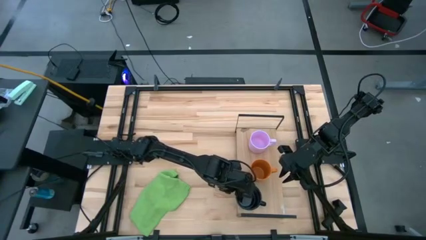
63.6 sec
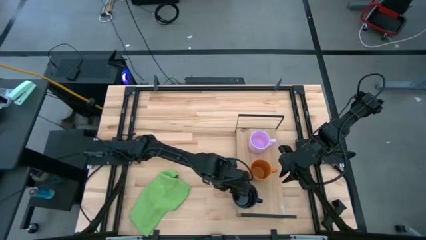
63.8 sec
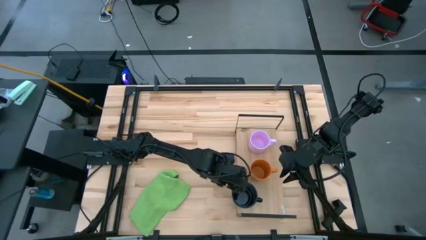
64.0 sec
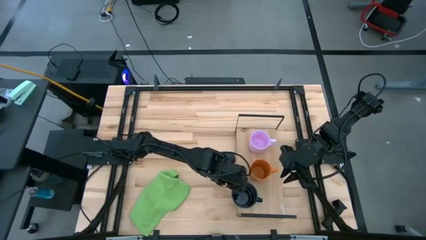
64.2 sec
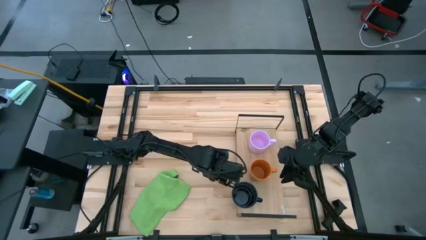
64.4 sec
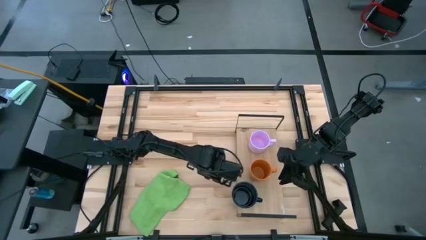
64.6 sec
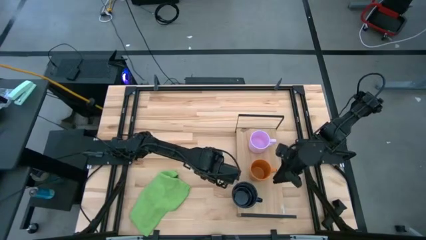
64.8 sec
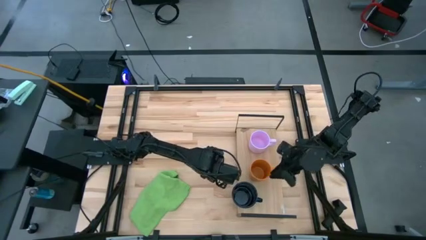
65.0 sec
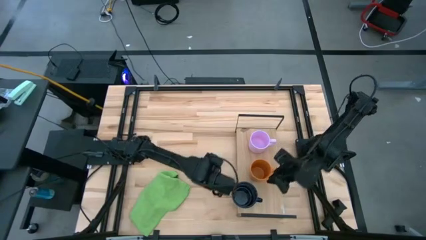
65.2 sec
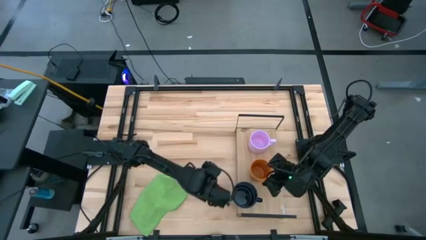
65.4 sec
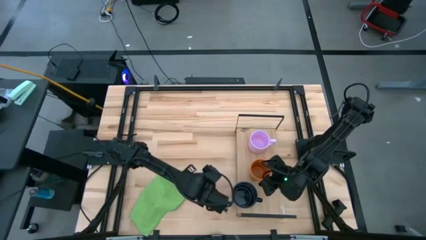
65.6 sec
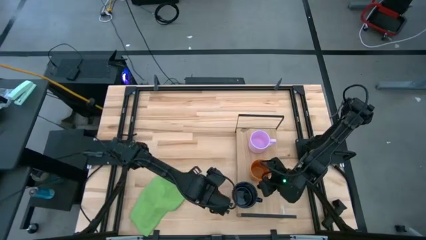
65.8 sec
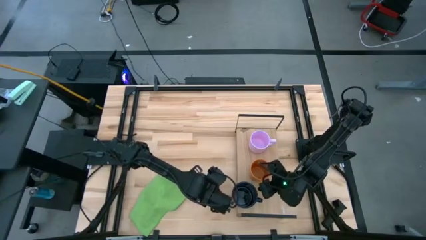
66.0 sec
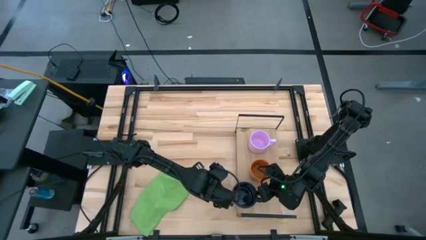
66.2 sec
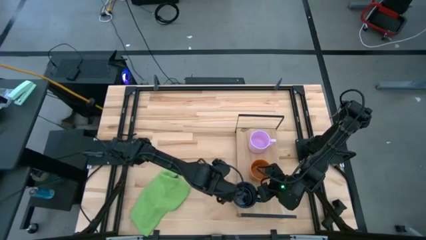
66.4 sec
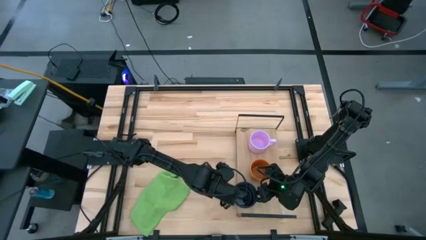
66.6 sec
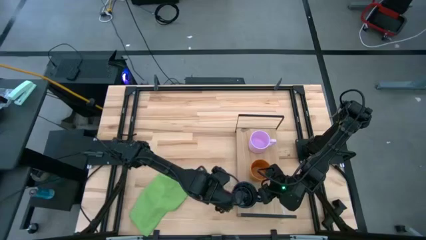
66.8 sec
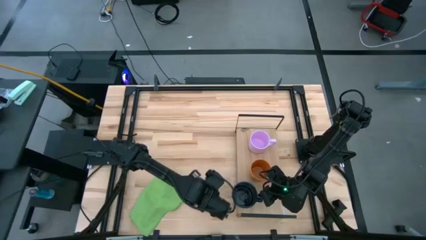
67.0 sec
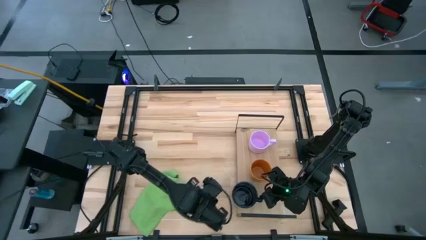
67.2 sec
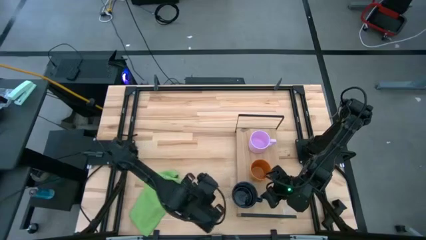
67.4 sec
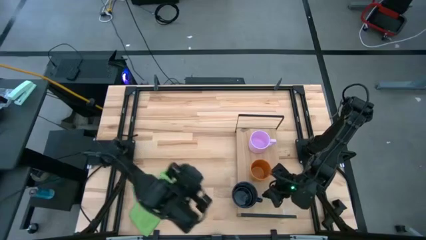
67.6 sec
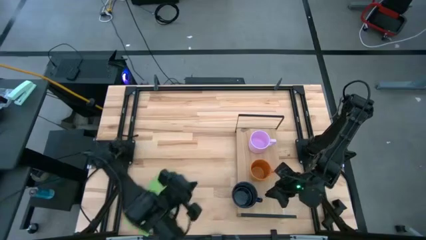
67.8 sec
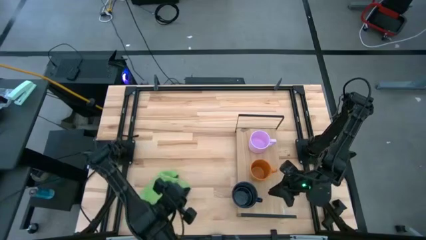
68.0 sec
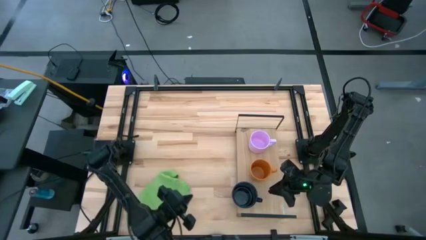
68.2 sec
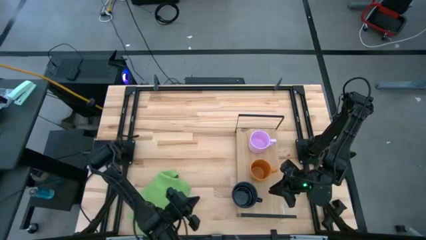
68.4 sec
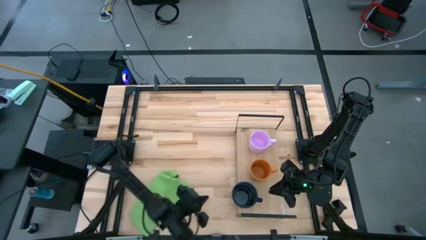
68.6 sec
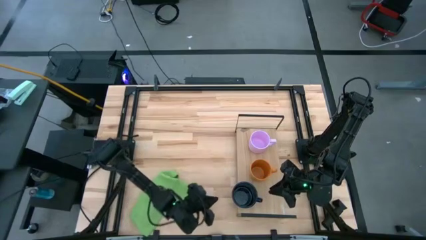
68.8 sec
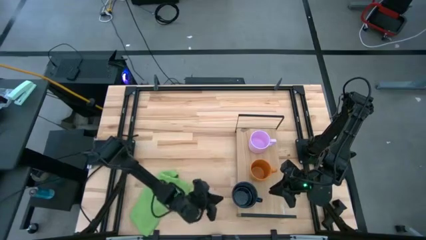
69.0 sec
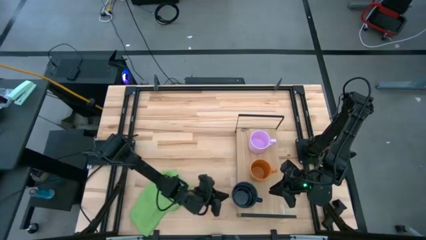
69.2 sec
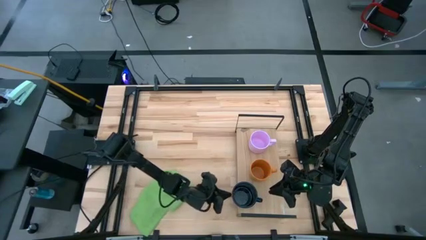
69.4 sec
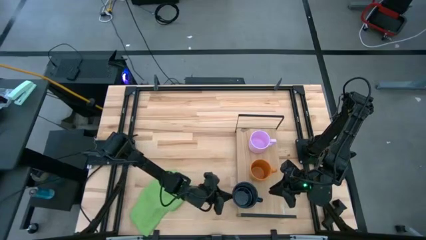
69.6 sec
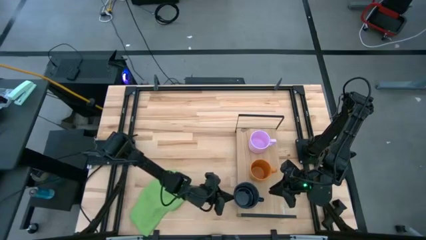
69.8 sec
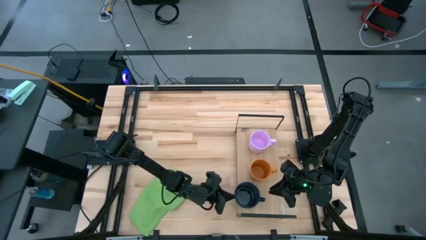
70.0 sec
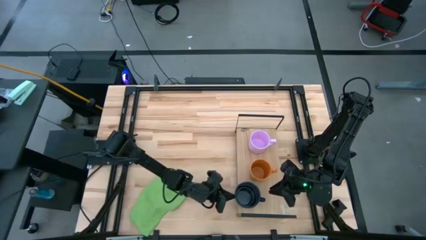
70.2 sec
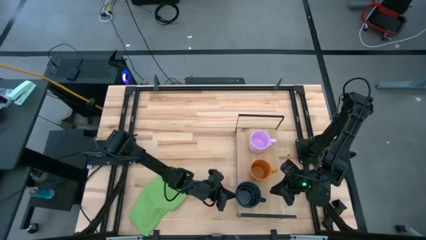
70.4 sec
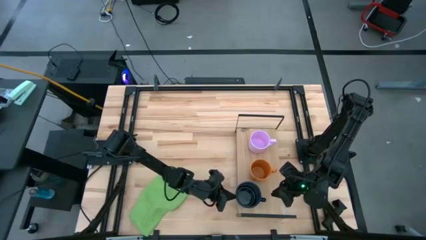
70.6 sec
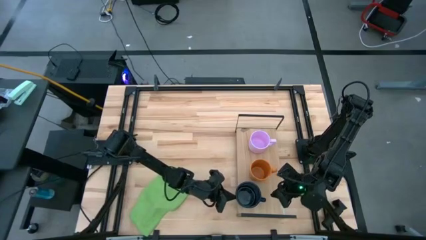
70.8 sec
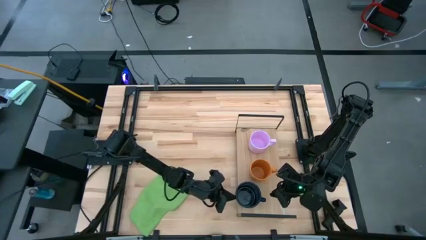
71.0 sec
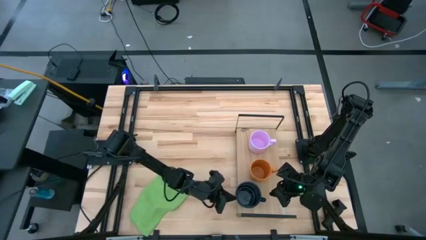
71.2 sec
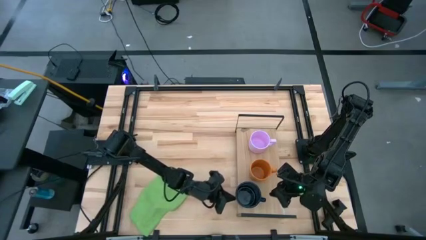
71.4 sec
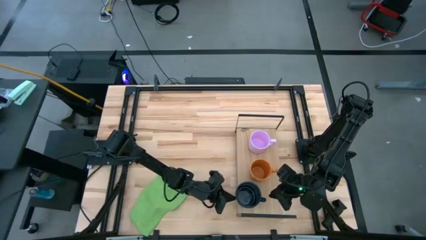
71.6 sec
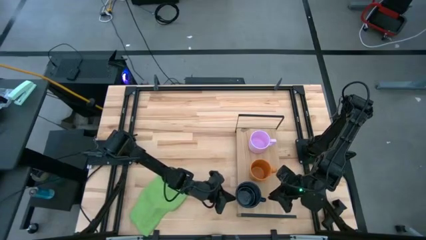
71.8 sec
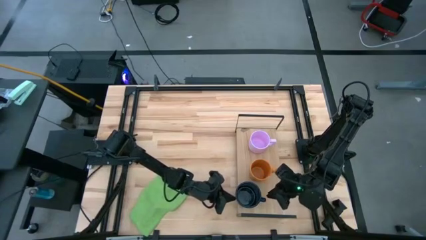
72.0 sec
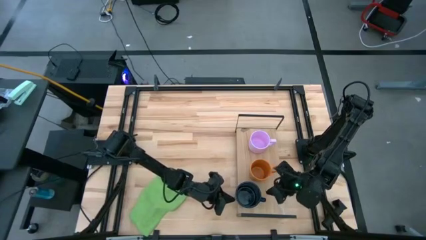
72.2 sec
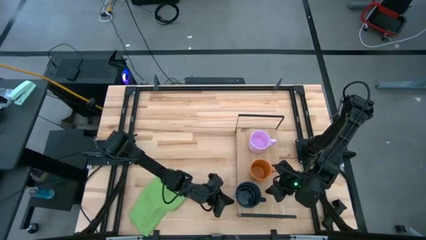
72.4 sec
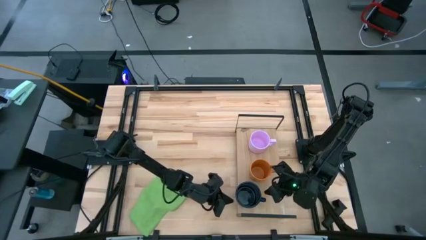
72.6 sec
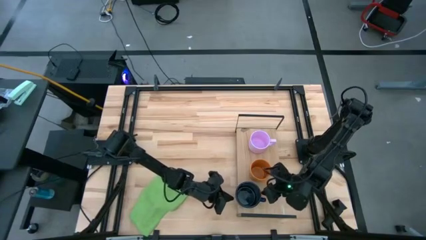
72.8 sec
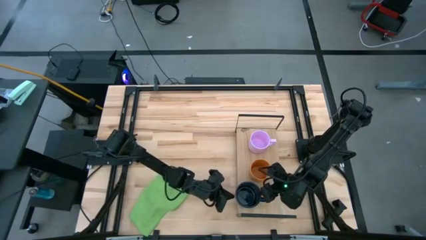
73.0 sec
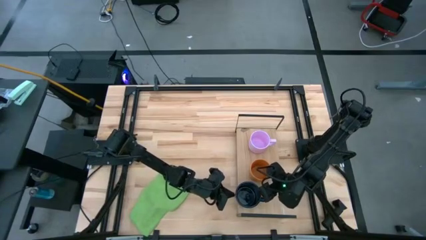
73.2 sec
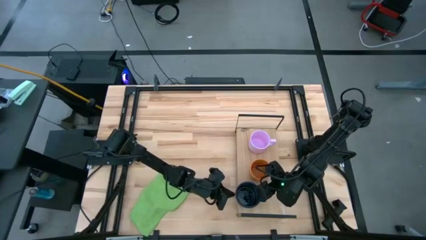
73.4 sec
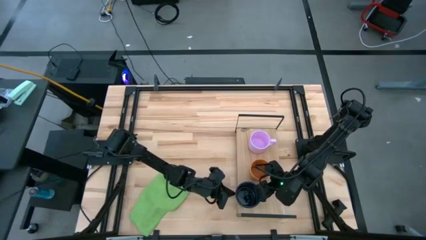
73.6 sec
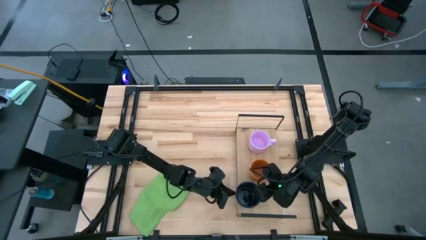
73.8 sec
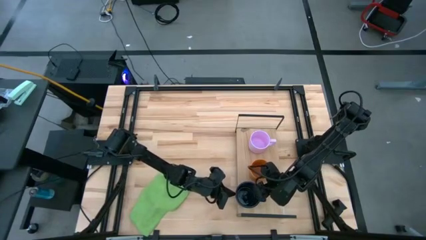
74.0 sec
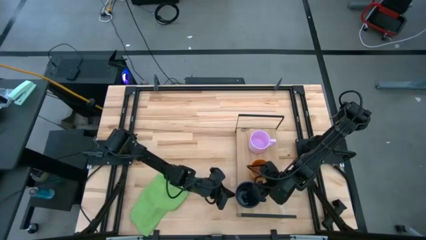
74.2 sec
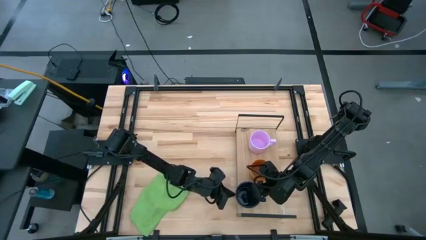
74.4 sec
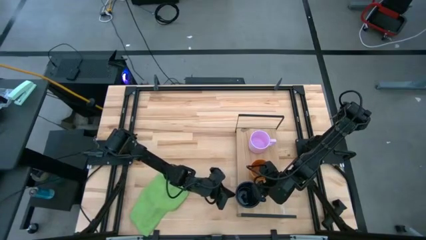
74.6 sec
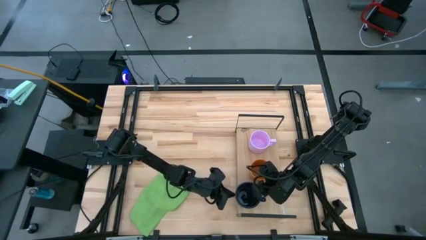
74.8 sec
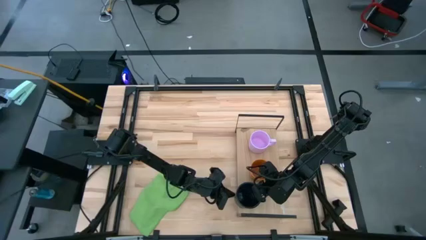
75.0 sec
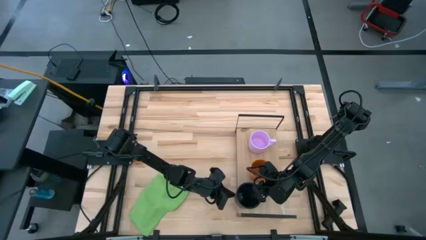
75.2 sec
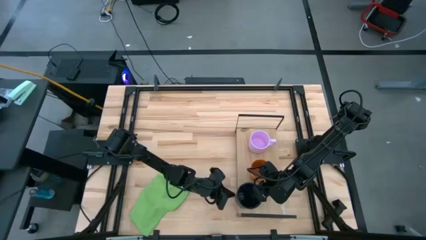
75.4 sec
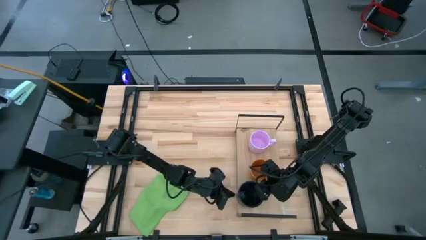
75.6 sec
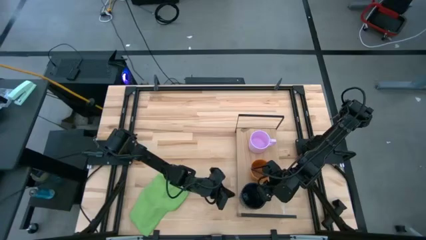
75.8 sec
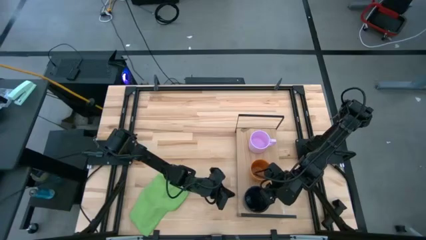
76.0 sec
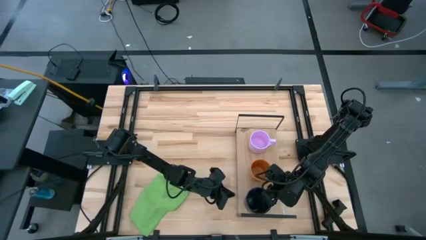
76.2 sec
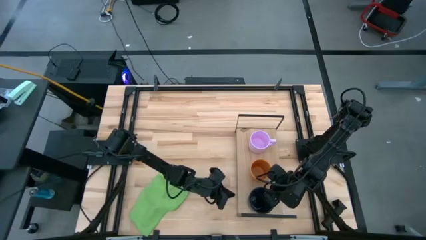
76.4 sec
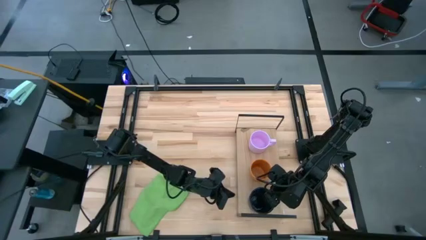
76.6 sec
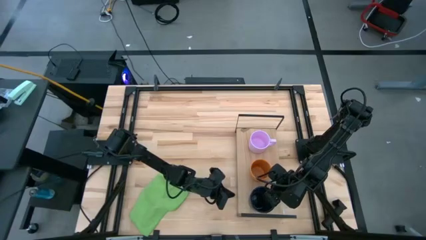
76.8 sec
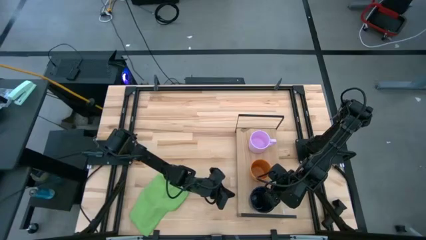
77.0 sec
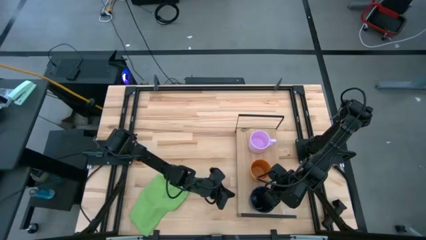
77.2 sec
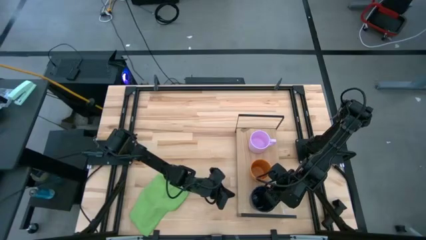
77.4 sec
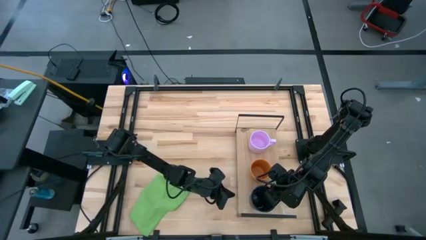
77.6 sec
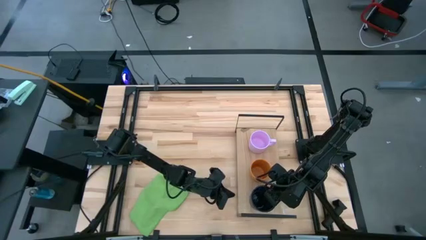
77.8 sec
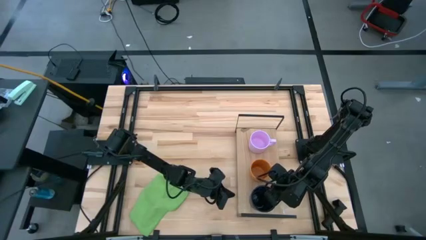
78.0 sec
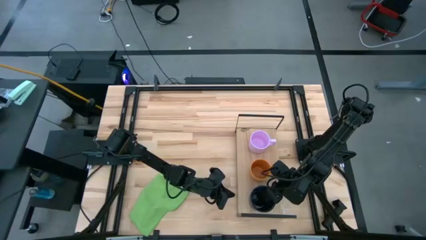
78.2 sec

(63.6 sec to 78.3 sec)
Task: Stack small to large cups/mugs on shelf
Put the dark blue mug on the shelf
